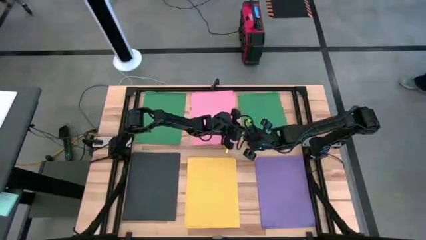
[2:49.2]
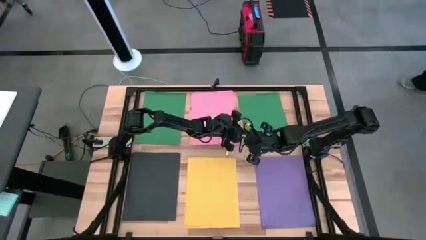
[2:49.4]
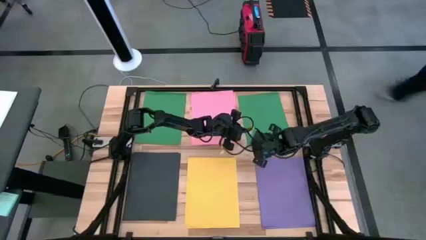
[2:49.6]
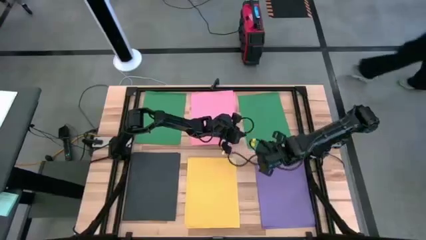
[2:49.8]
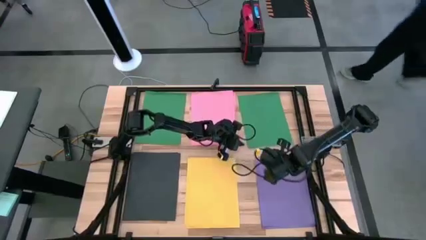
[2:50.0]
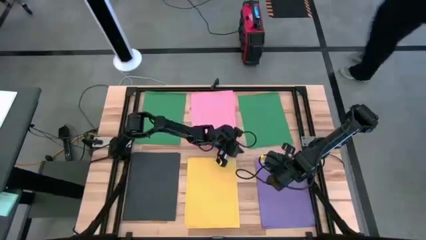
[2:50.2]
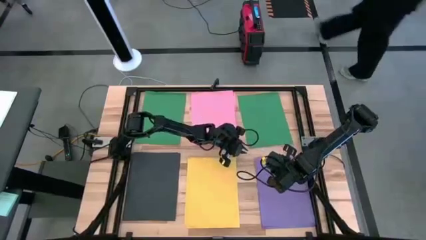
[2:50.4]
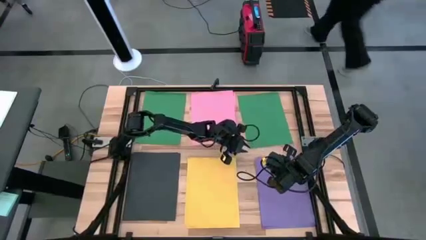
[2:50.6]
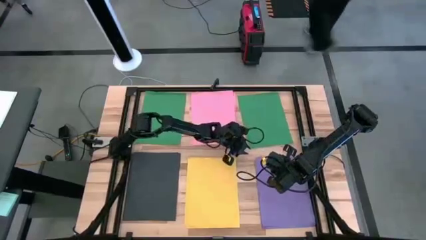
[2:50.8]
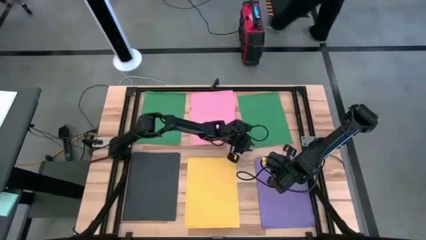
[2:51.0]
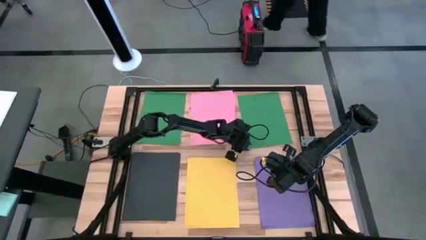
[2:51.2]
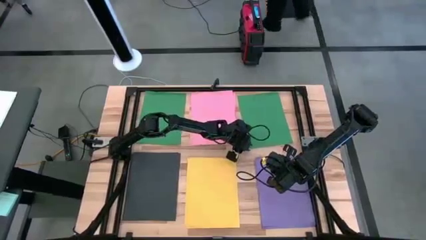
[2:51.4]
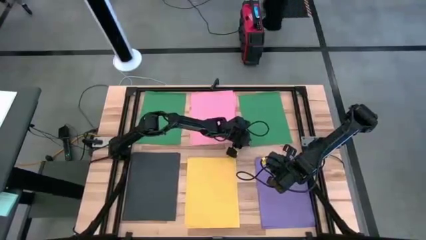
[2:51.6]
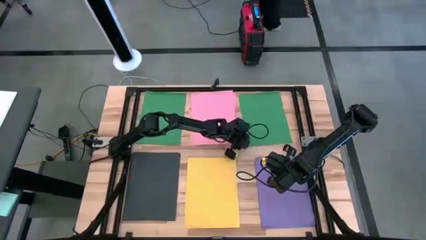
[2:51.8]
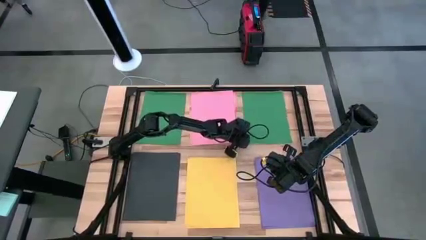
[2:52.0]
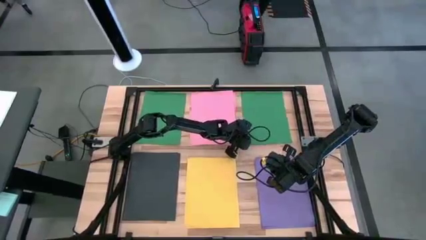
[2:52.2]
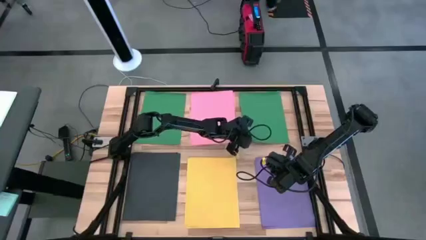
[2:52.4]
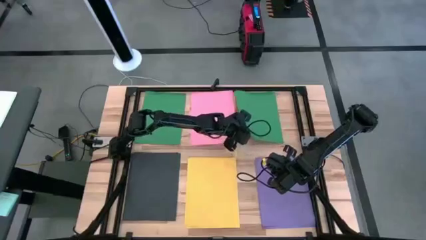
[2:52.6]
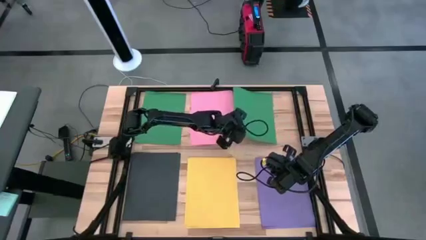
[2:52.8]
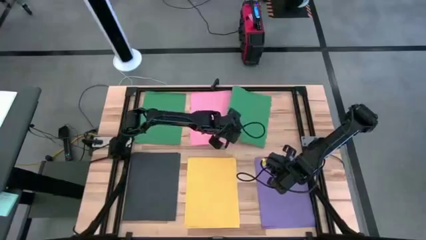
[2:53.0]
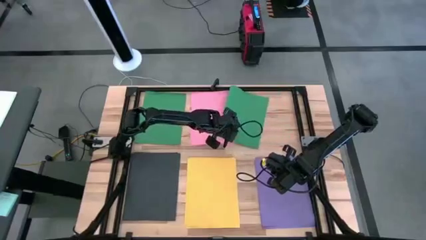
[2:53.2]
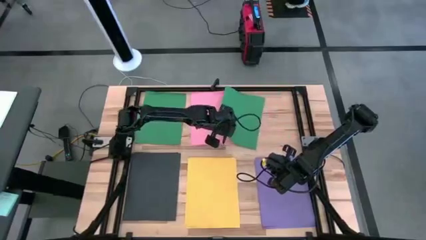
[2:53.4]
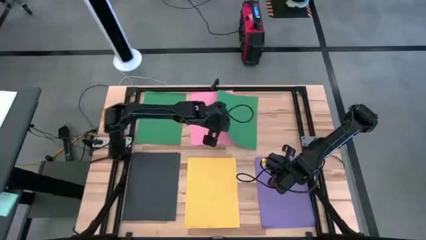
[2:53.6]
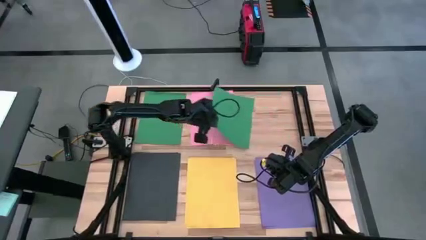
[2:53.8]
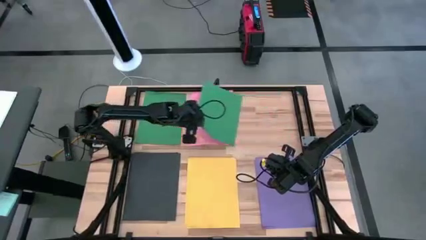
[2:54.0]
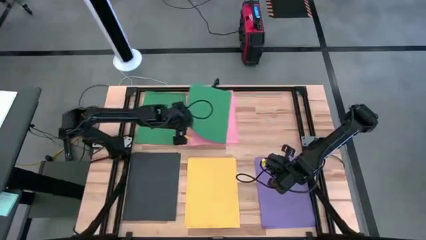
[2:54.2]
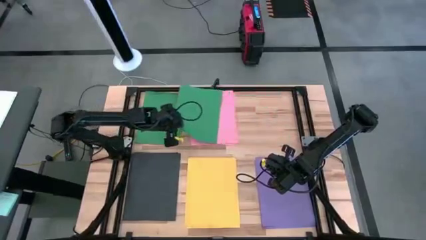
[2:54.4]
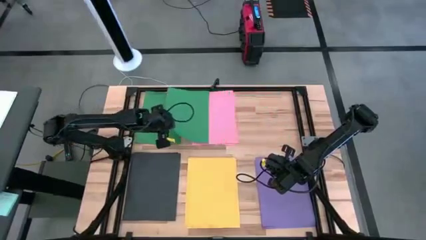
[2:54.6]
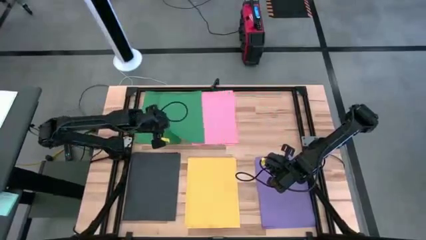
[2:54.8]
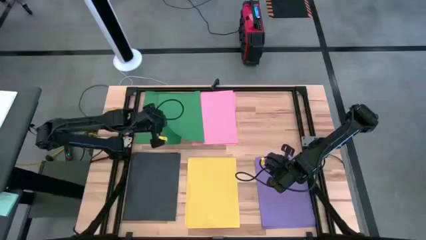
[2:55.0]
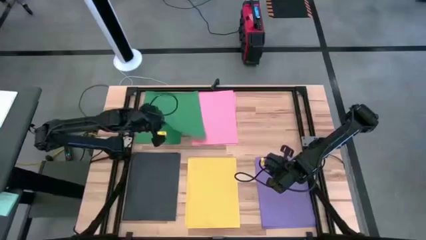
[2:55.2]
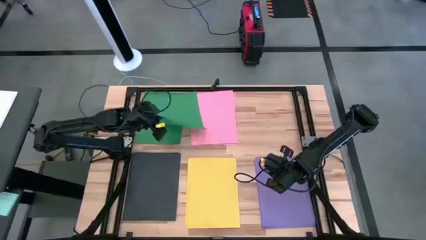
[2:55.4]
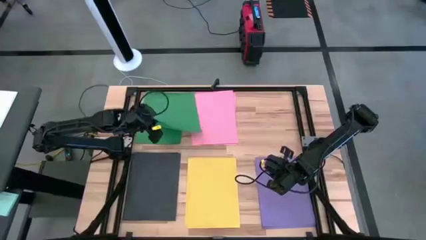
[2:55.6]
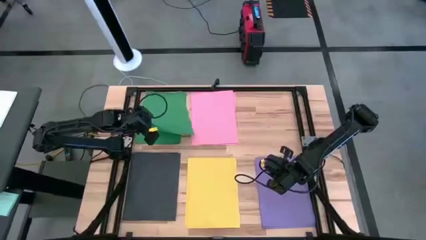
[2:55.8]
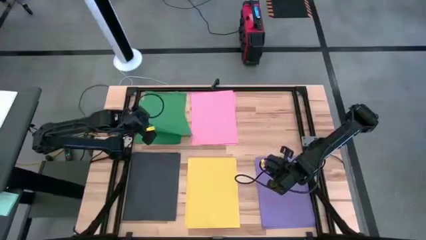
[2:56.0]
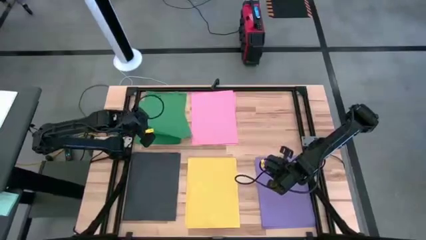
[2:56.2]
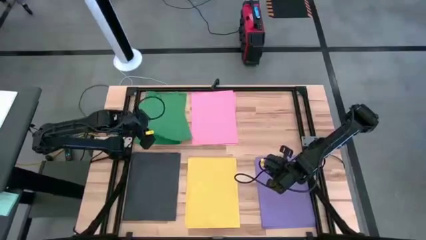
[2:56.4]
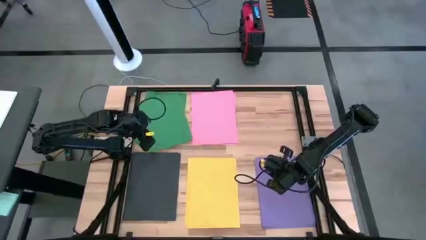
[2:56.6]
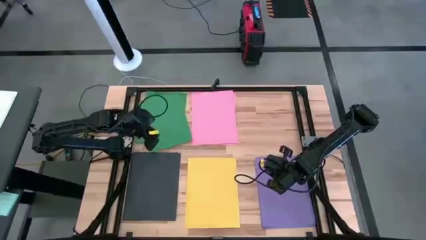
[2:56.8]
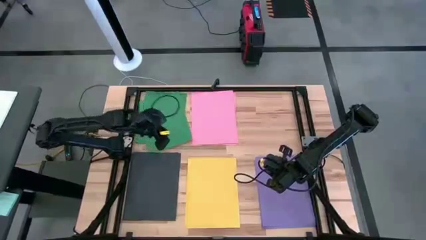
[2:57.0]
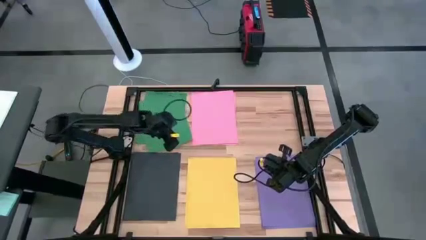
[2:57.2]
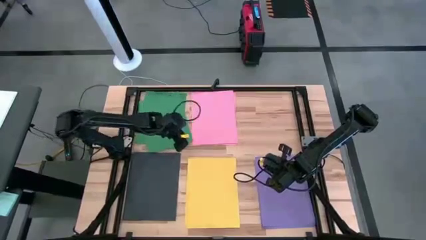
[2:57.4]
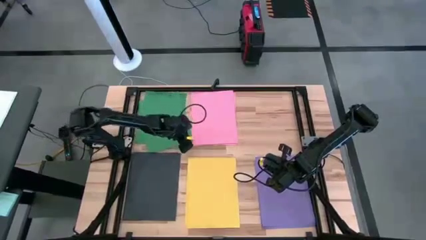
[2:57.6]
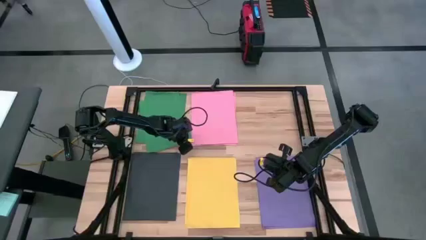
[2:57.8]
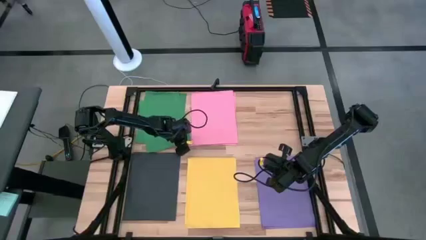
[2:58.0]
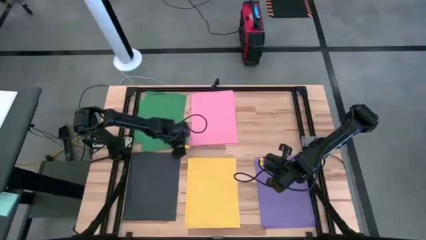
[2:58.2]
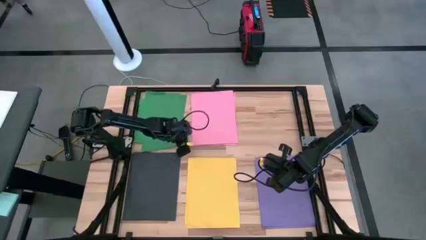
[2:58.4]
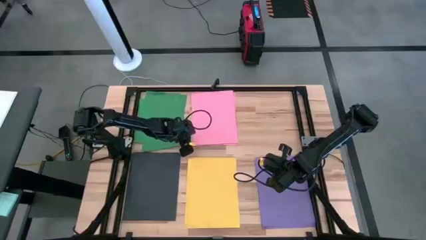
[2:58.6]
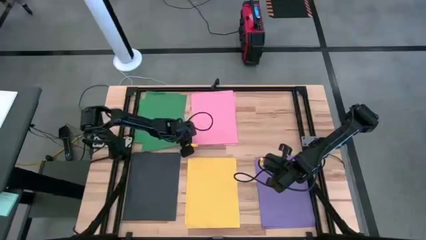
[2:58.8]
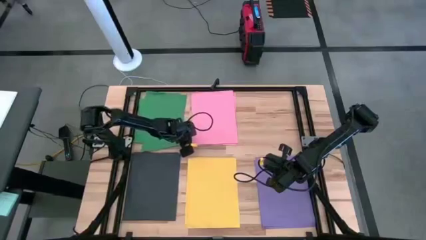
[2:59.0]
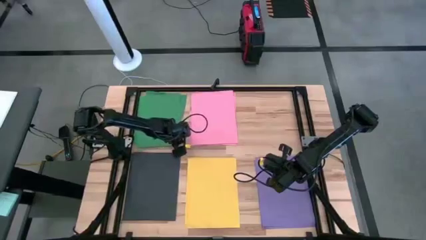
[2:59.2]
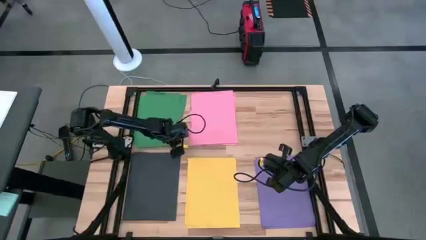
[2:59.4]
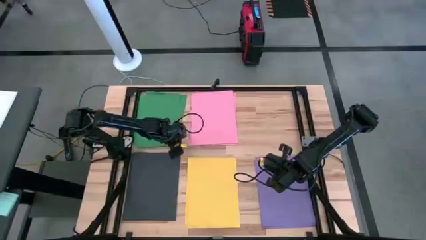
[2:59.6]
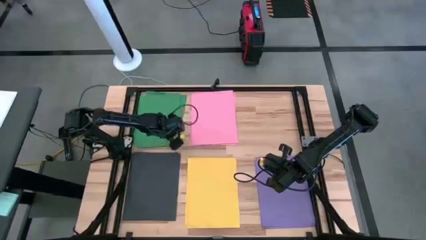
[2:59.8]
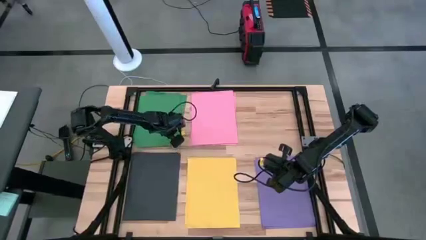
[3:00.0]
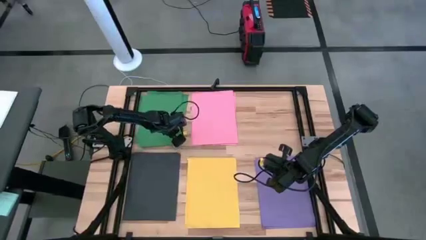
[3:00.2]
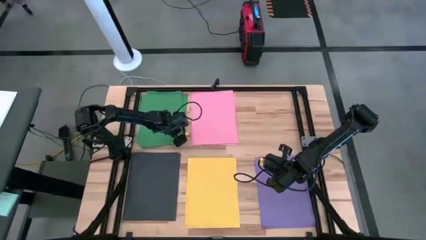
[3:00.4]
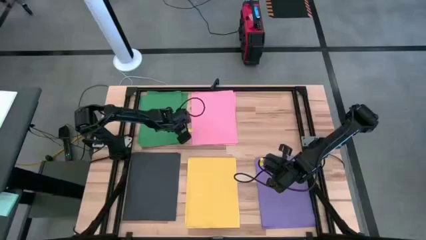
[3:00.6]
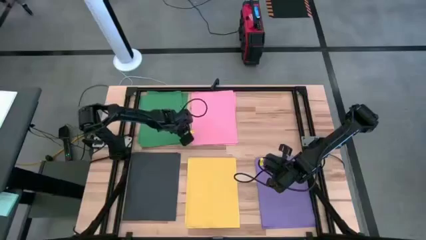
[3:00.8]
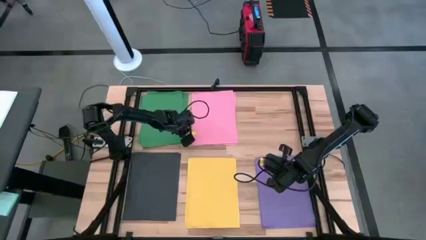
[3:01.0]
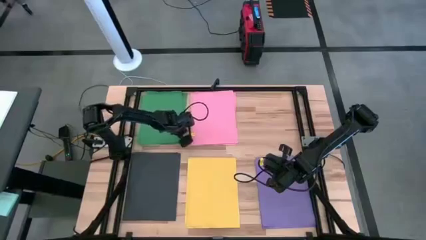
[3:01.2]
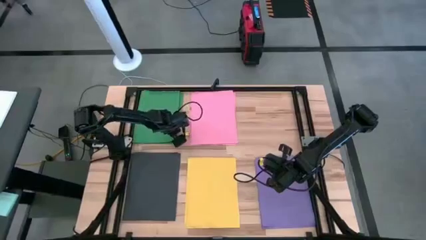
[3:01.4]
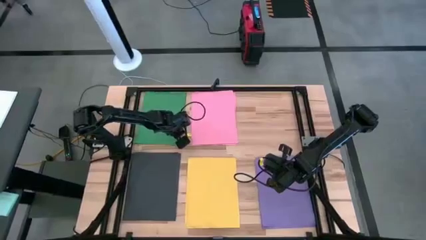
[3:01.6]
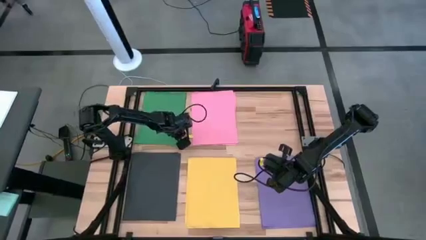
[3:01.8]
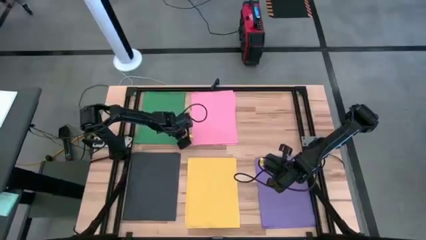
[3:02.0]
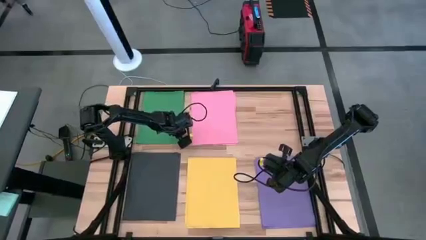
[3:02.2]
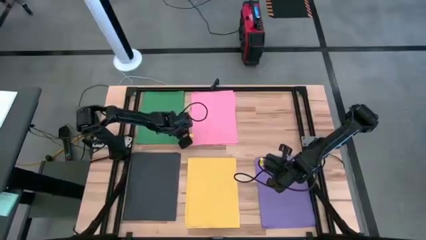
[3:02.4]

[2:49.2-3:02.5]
Task: Organize paper
Stack the green paper on the top left green paper
